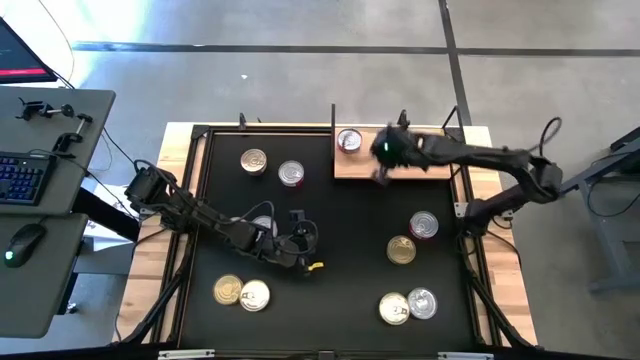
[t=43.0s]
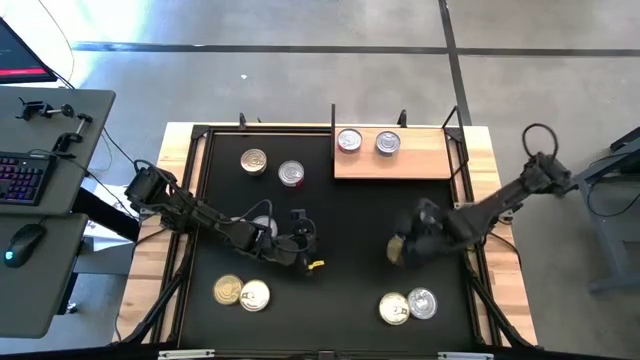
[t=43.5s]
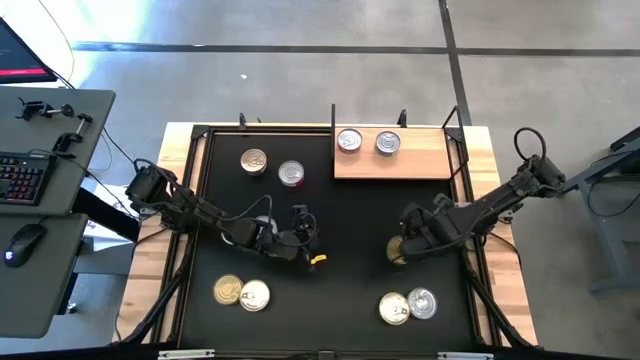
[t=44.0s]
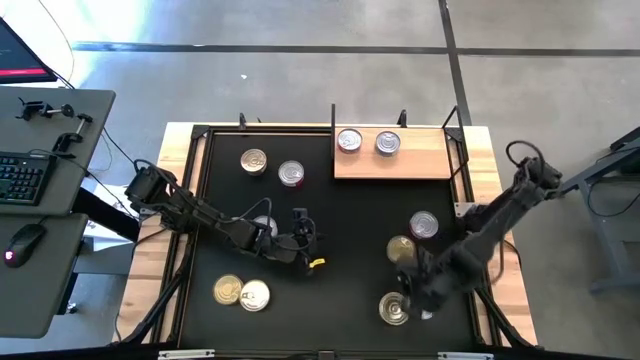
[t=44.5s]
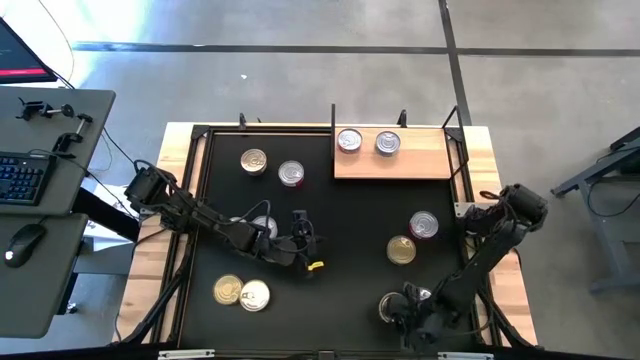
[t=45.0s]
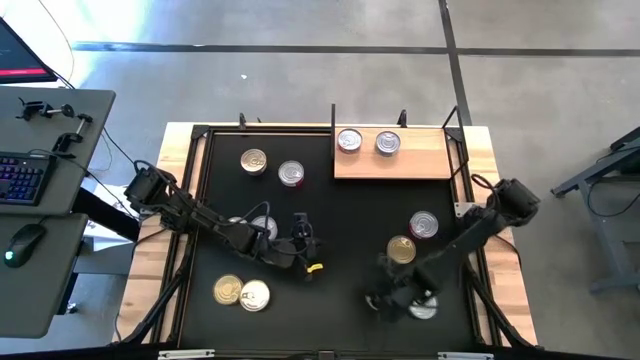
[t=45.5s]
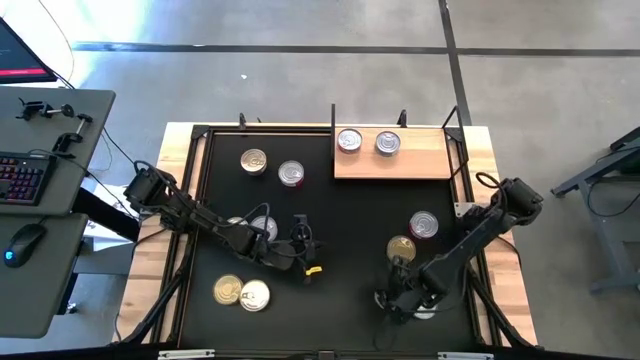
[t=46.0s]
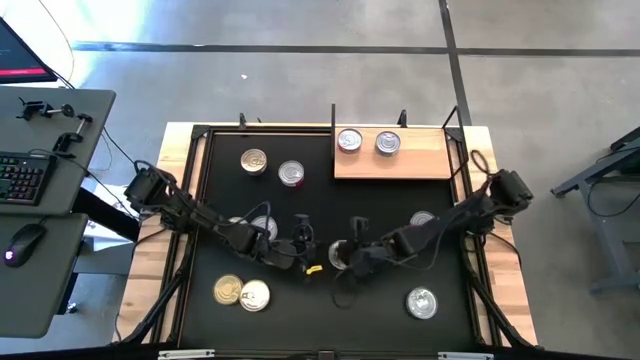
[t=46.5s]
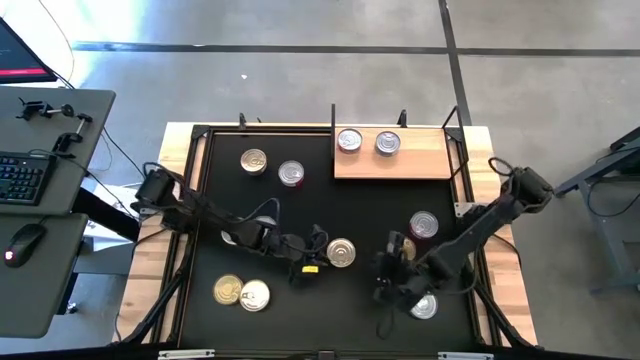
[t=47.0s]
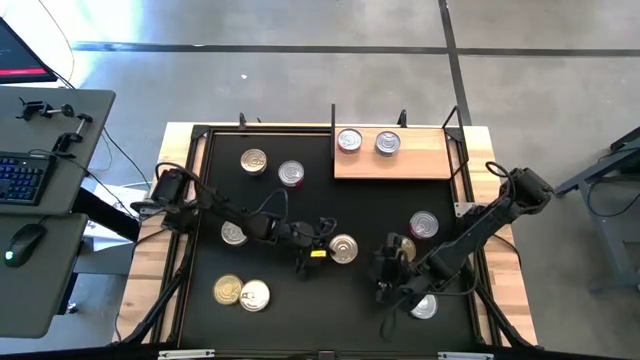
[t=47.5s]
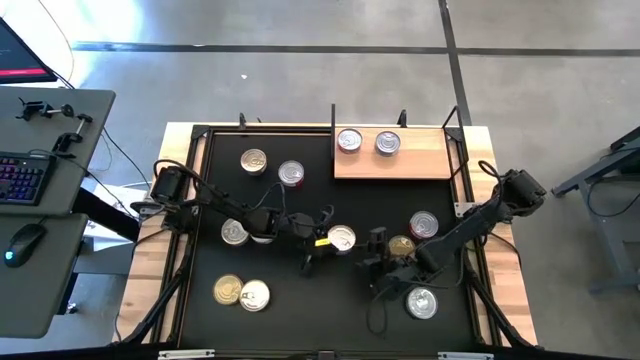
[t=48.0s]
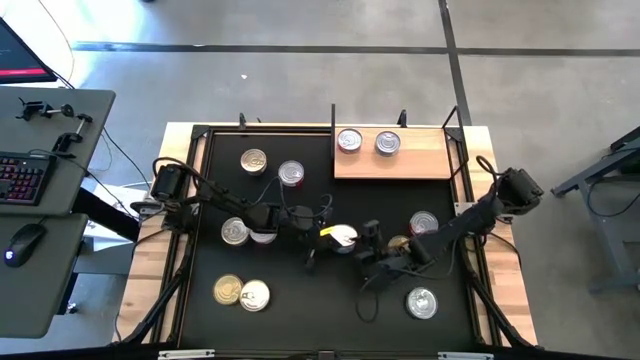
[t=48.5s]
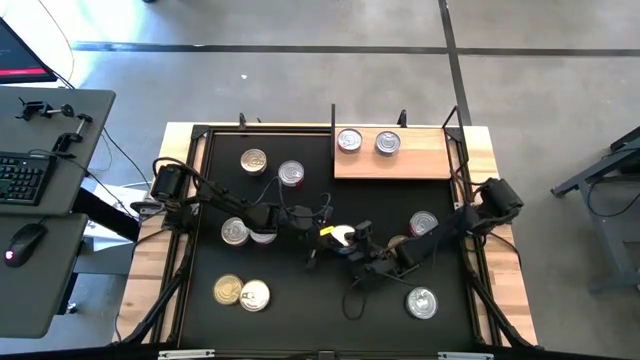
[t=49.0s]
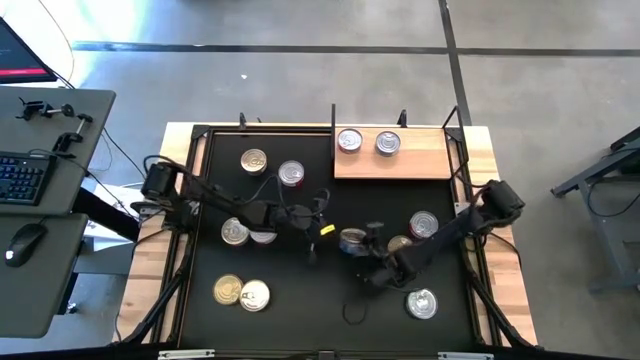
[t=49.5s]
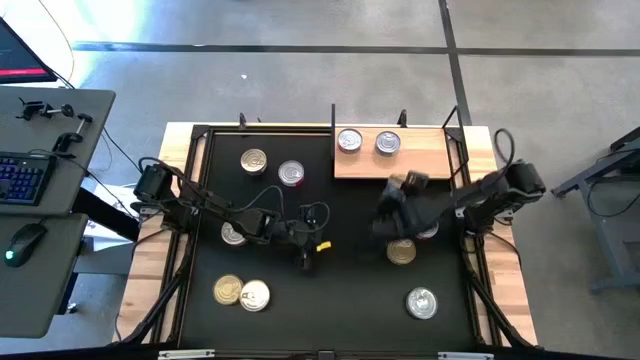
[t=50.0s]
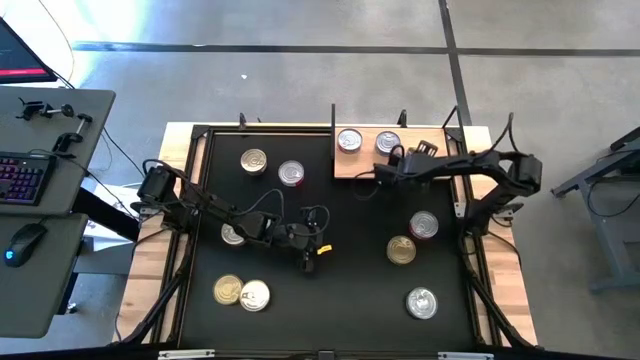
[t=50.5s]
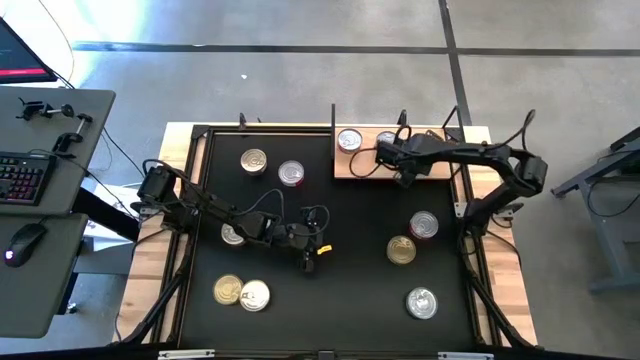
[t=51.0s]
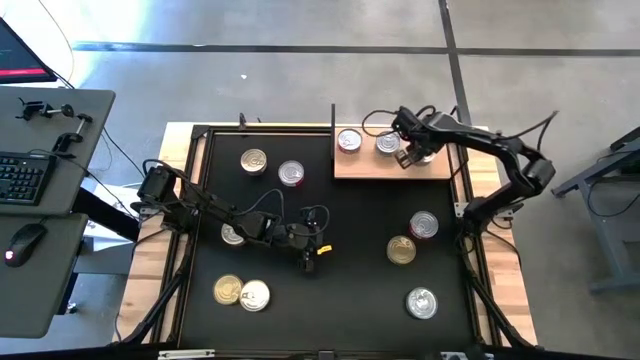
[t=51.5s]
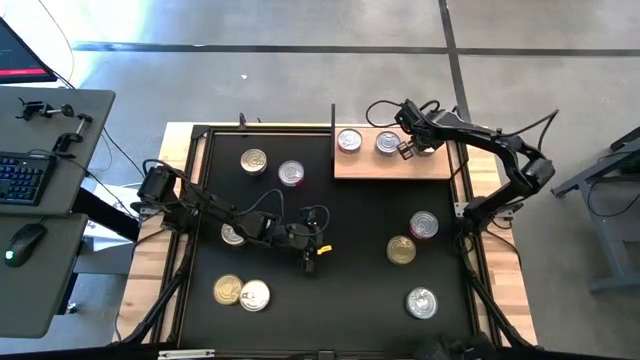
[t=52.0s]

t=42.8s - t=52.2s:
Task: Stack canned seafood by type on shelf
Put the blue tuna can on the shelf

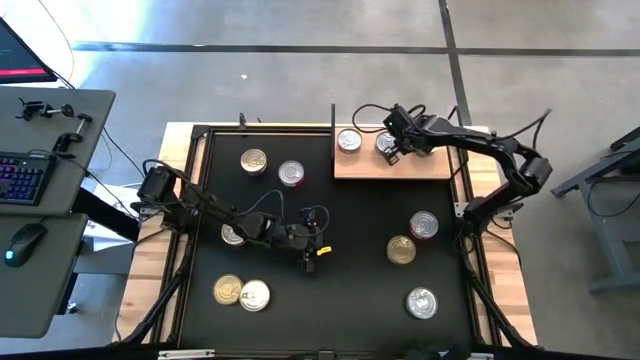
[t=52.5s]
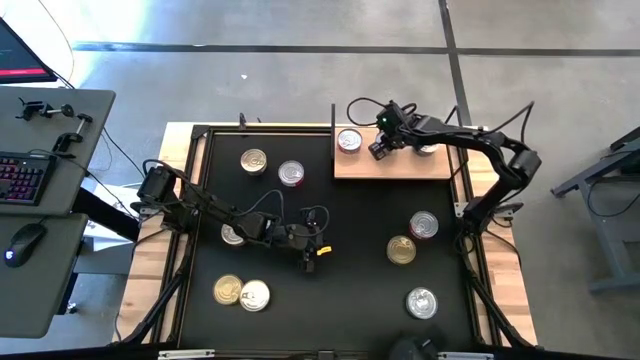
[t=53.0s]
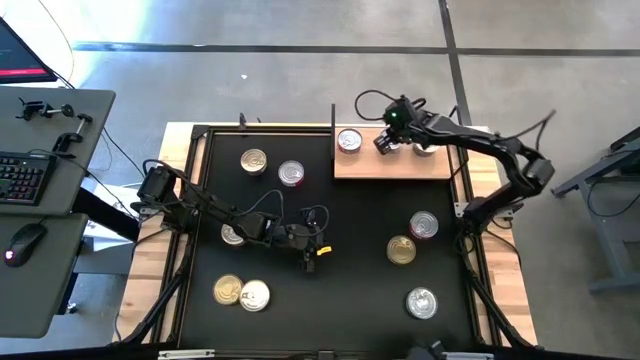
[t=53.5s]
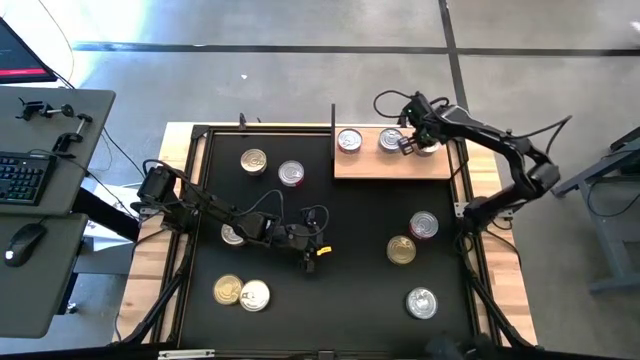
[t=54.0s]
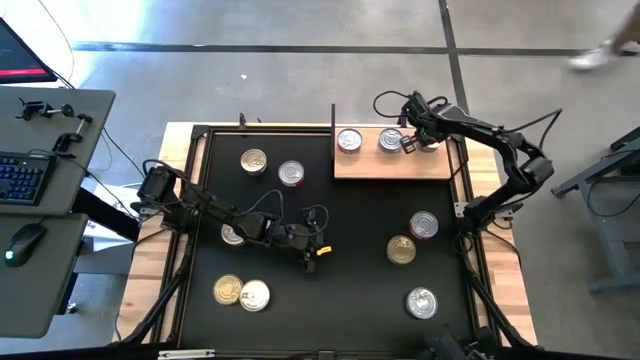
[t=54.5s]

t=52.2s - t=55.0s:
Adjust the green and blue tuna cans on the shelf

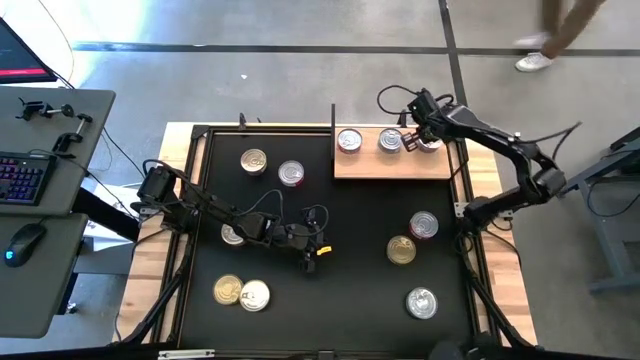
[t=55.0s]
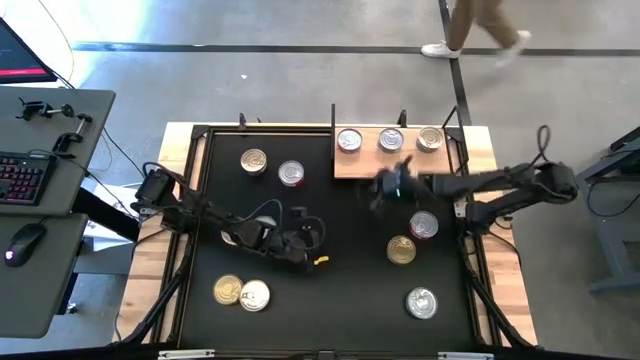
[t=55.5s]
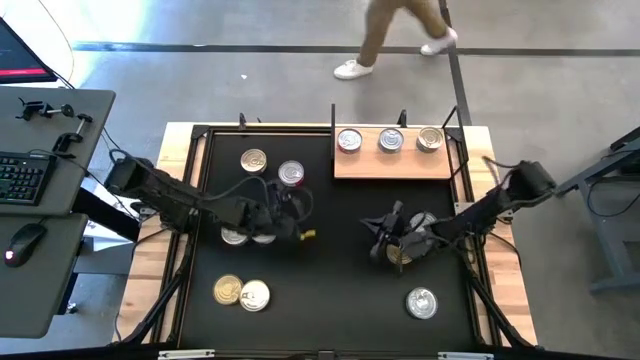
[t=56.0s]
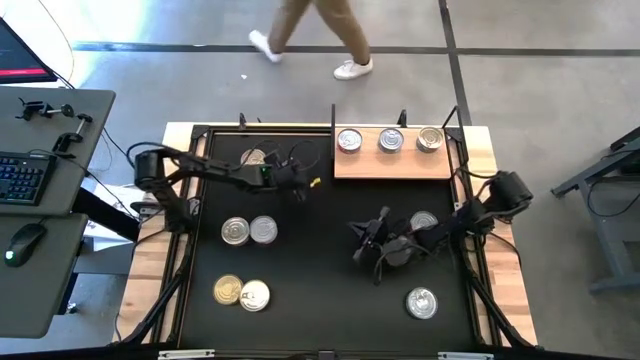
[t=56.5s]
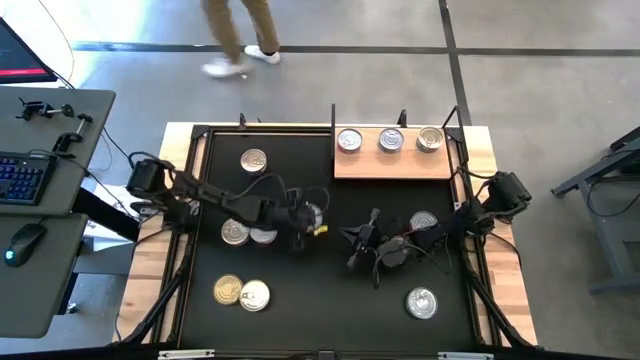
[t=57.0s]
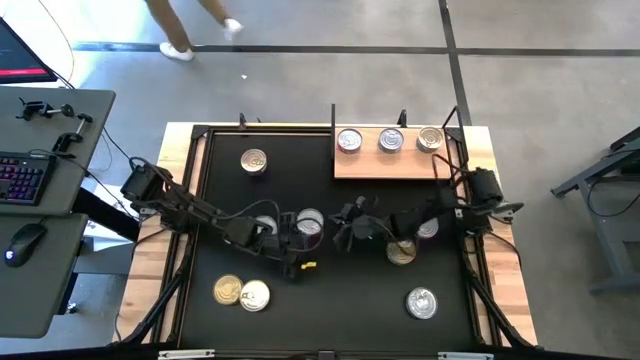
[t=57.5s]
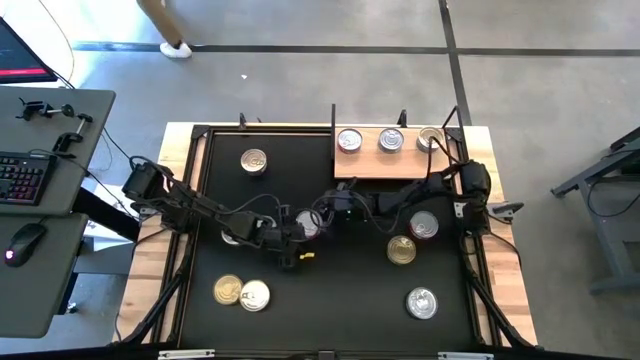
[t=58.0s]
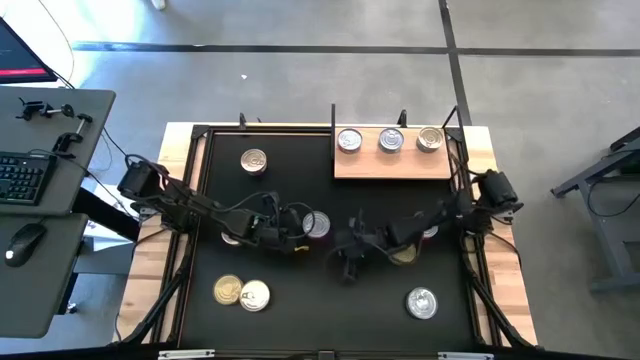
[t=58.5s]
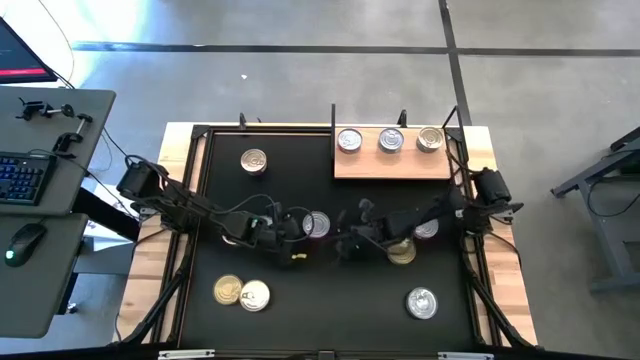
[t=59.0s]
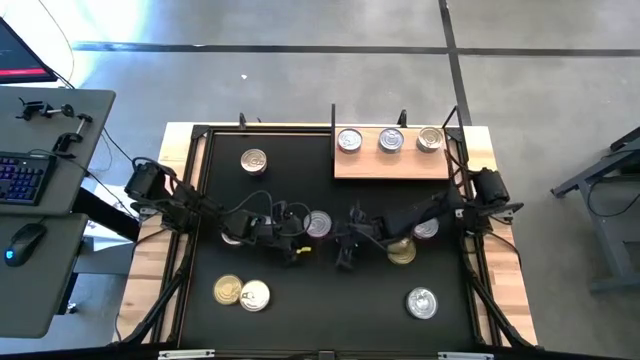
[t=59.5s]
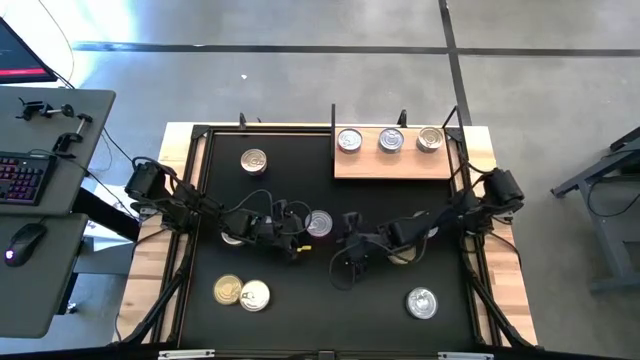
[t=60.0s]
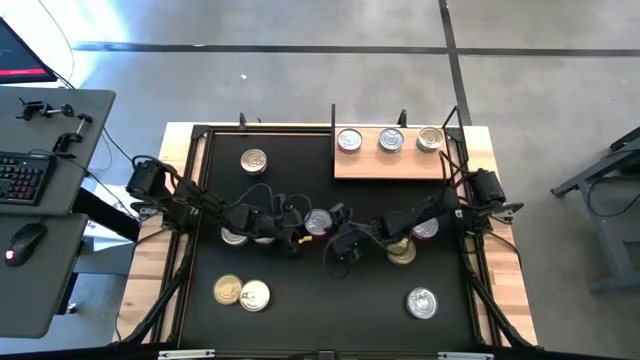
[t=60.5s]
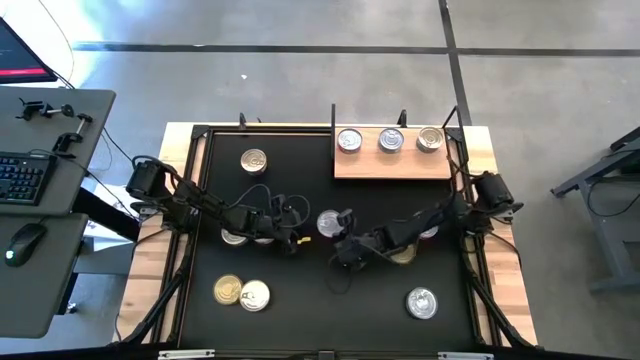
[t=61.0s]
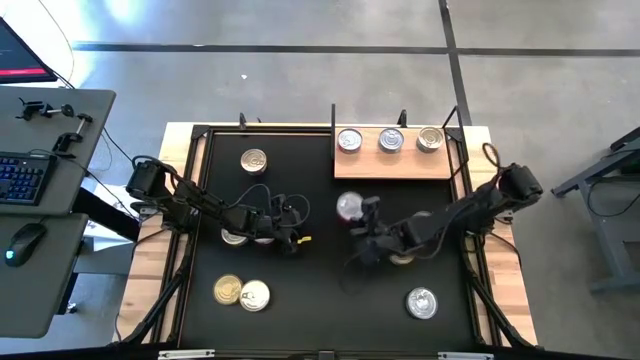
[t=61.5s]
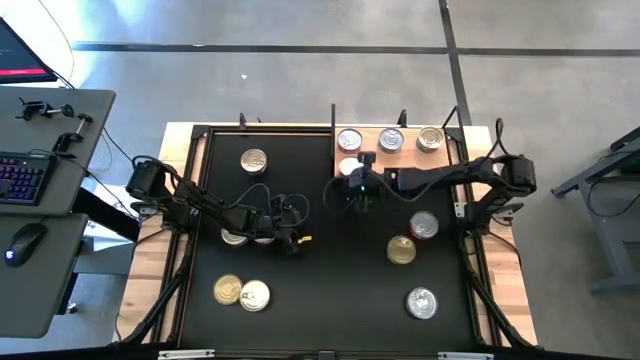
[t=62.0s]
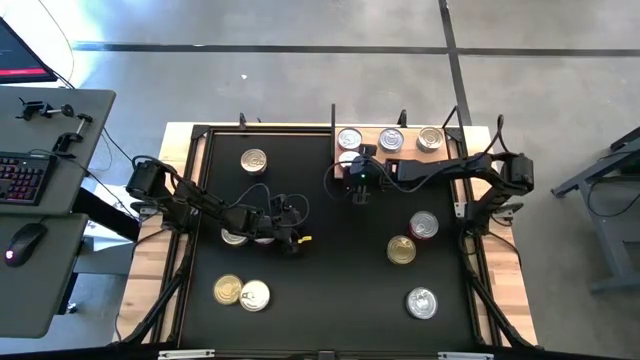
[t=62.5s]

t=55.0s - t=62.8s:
Put the red tuna can on the shelf aligned with the other red tuna can
